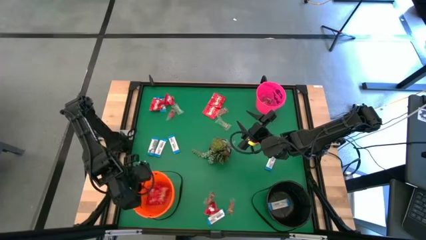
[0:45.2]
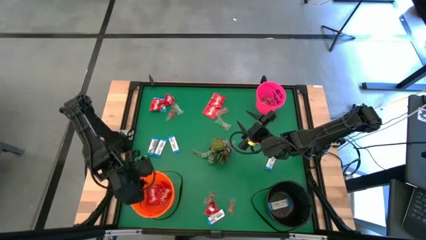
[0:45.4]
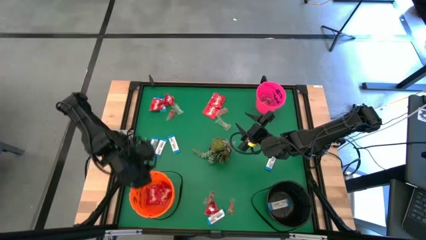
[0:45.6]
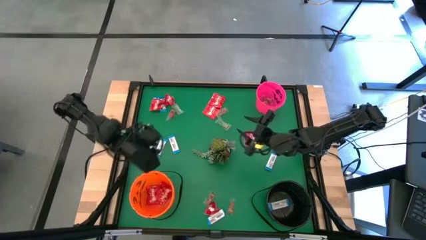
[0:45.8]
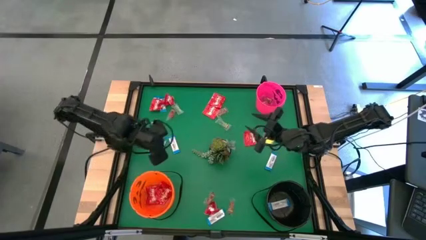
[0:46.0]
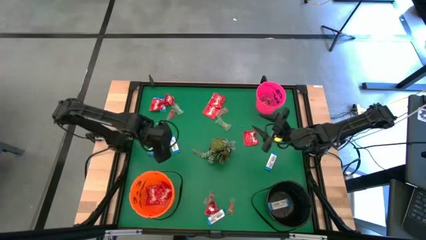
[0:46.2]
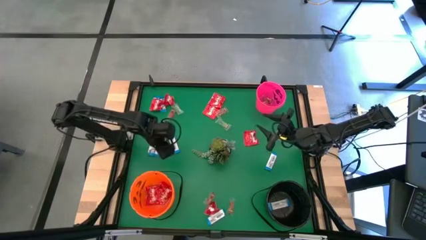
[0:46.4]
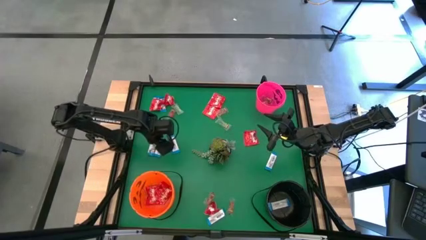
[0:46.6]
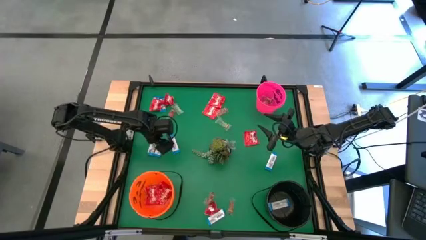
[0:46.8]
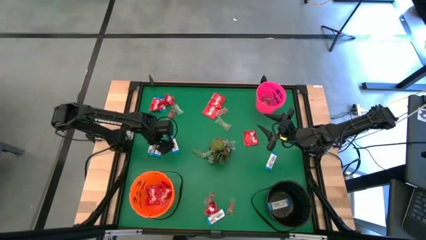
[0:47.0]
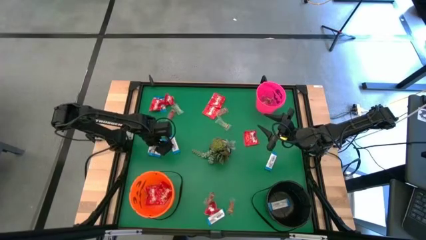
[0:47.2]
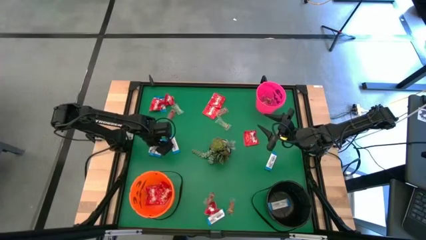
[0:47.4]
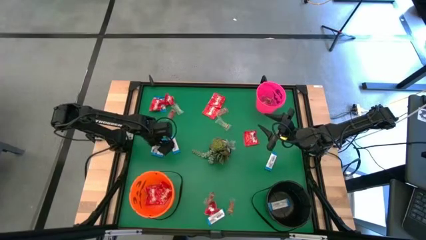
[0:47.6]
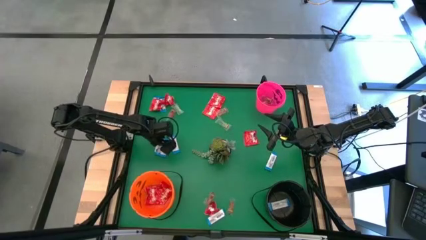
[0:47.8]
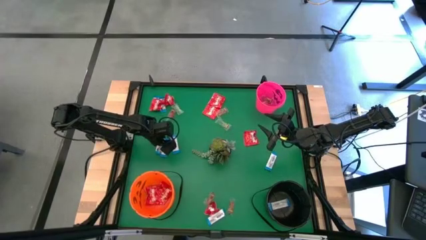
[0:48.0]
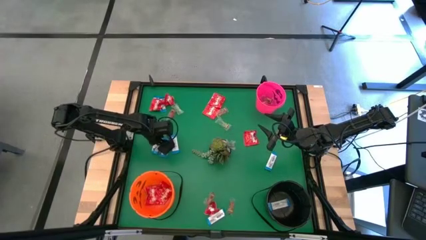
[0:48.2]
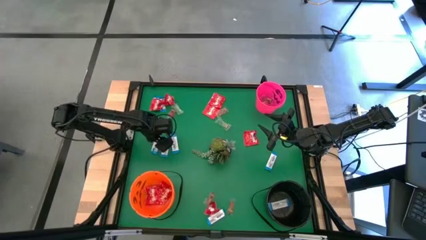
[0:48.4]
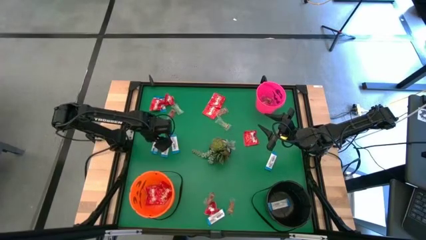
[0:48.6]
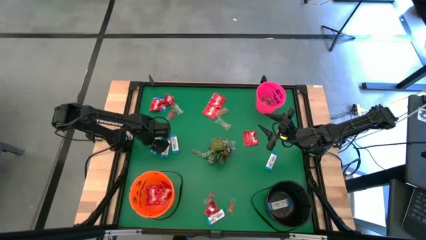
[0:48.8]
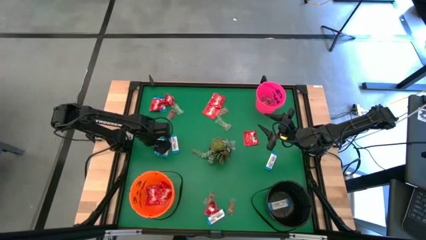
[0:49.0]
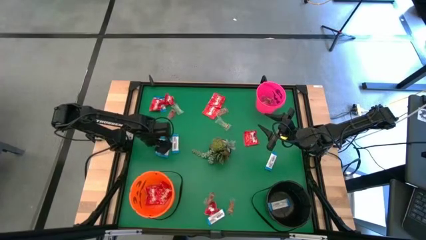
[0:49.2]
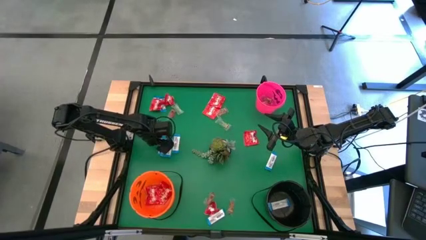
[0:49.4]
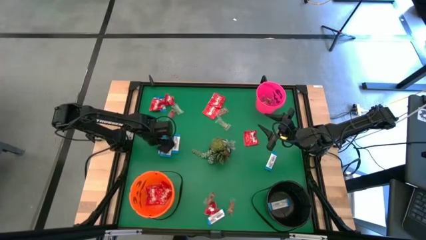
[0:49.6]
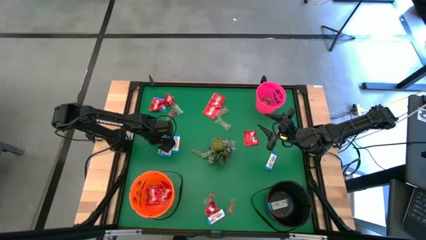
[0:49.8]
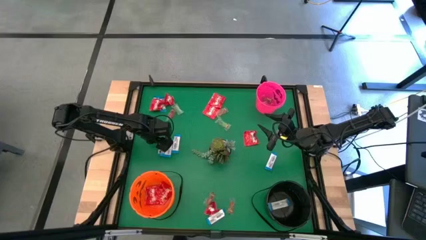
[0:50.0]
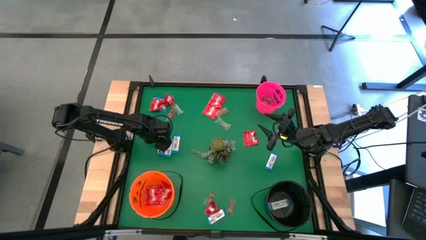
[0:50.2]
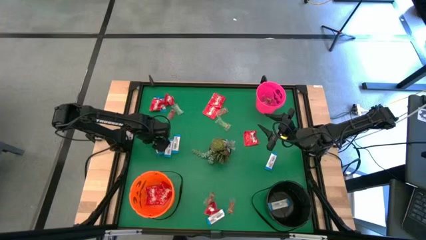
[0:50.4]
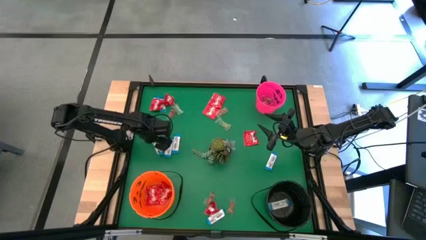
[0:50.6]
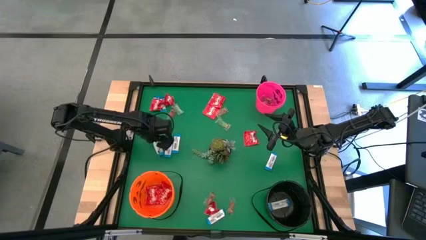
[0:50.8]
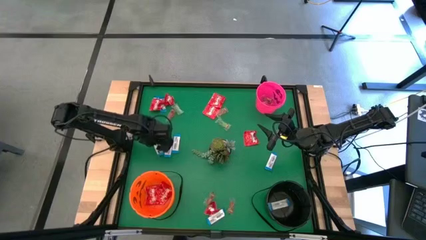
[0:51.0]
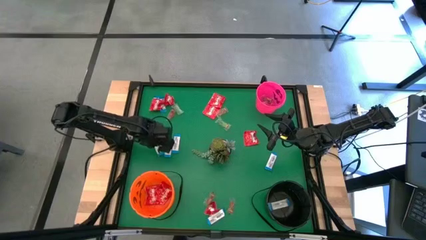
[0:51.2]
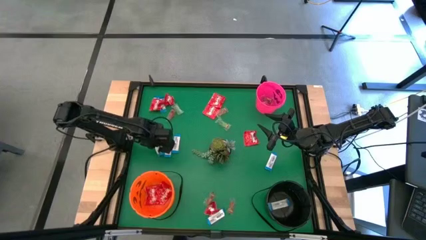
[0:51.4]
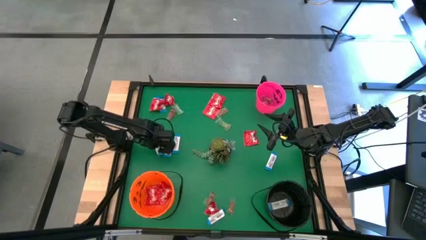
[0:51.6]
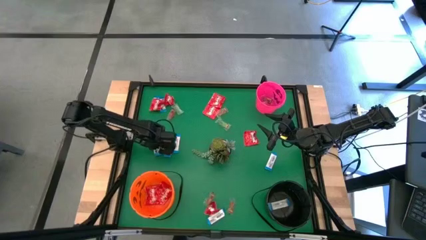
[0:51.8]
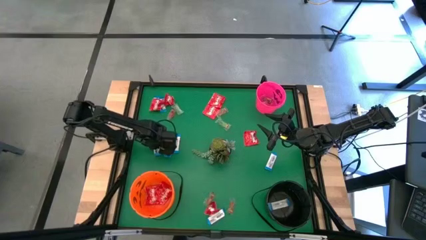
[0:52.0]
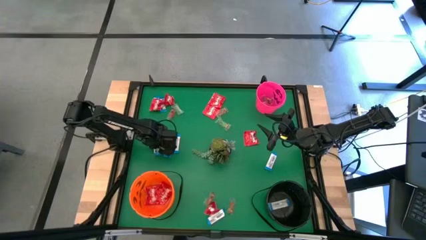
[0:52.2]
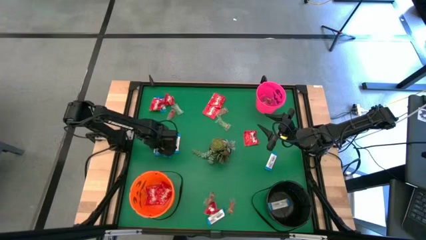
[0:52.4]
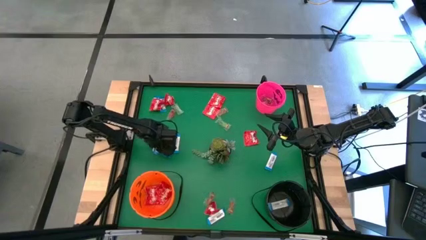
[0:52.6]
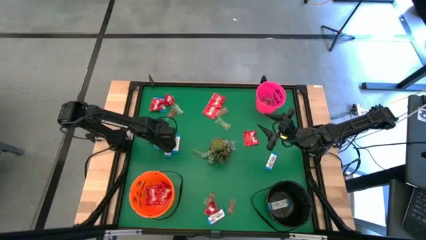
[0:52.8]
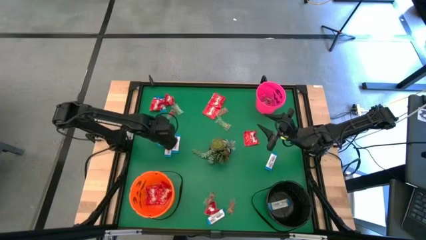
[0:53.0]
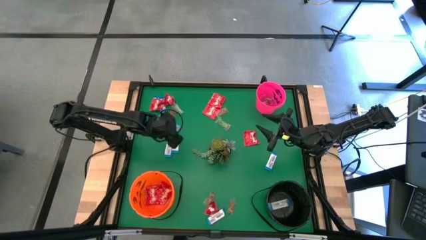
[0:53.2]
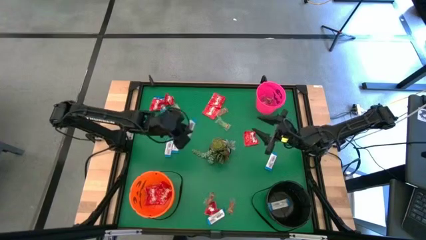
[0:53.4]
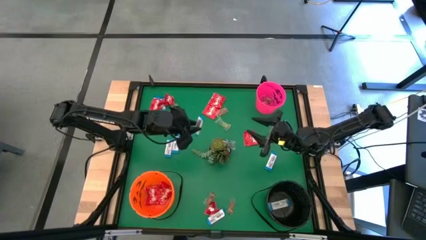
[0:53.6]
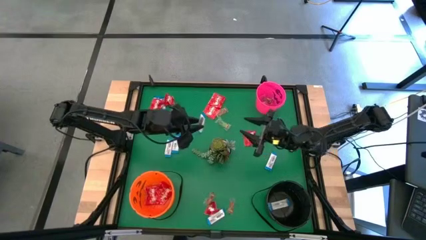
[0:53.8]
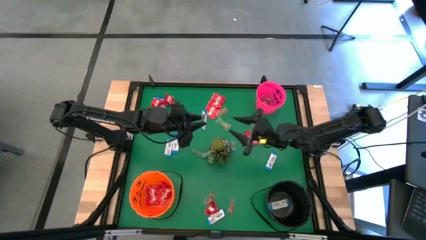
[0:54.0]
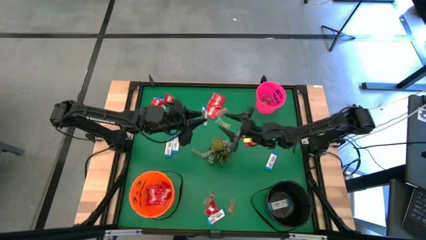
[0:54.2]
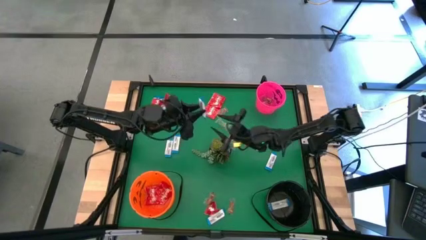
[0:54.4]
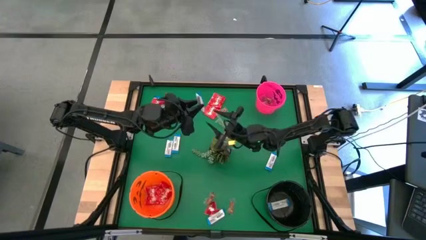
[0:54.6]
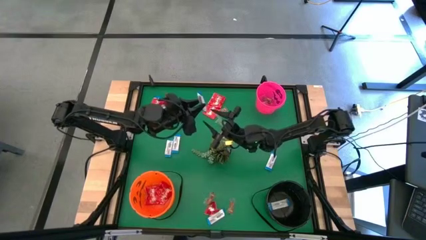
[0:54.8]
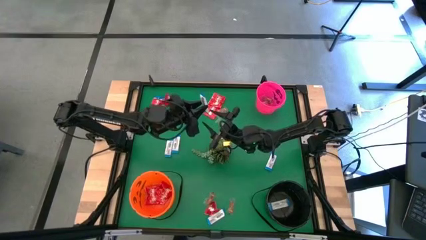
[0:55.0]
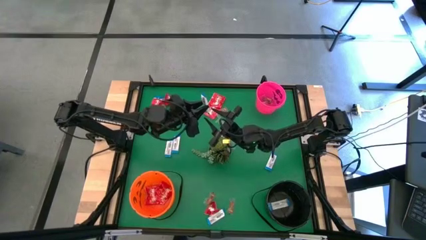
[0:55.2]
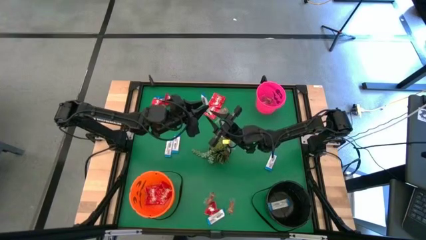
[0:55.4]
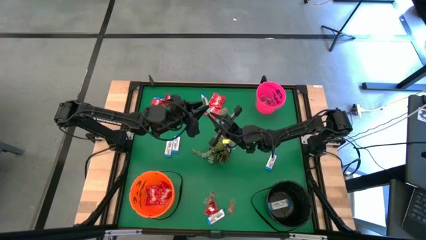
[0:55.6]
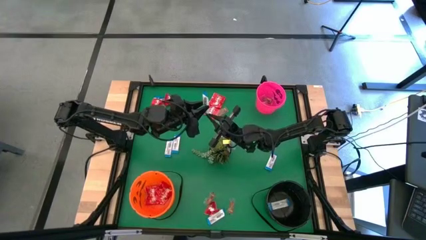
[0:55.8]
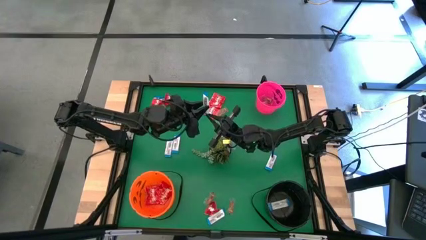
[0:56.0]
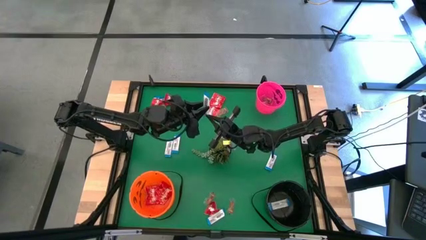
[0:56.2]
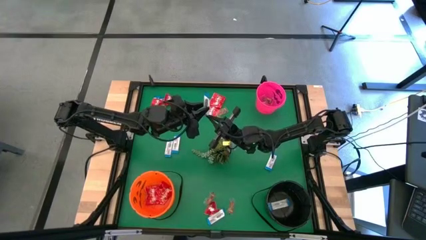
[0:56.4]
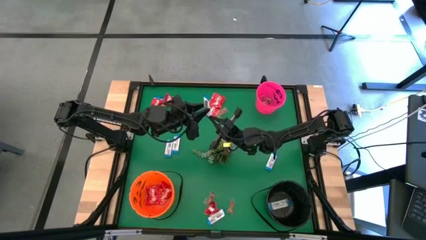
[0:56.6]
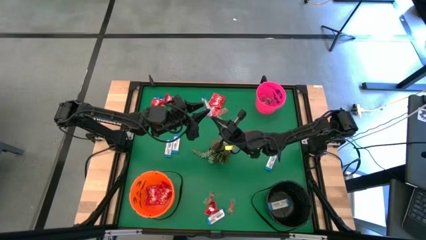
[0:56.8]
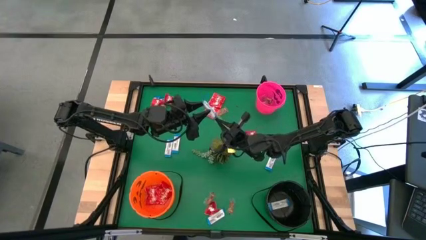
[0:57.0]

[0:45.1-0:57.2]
Task: Sort candy
Put the white chocolate into the black bucket

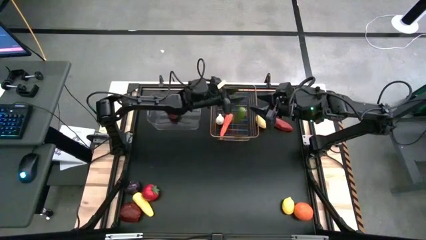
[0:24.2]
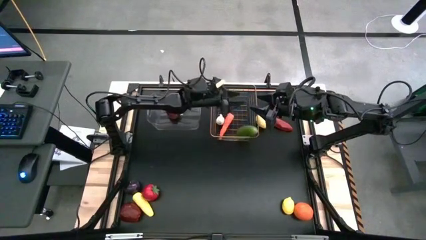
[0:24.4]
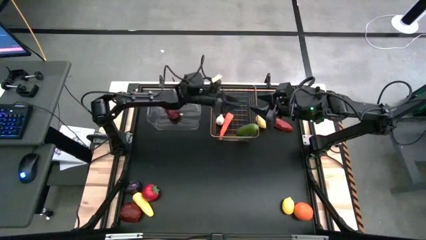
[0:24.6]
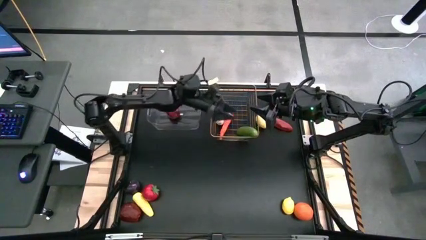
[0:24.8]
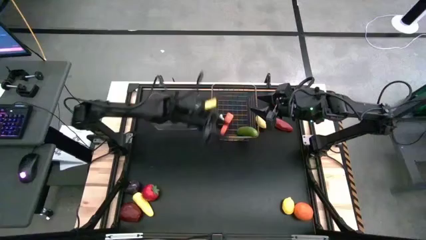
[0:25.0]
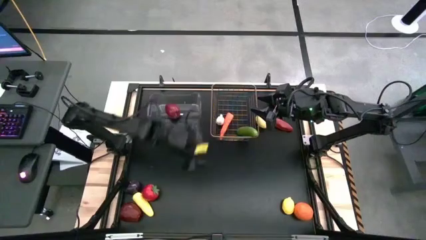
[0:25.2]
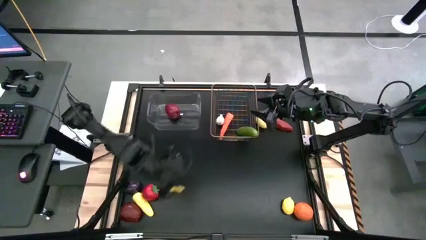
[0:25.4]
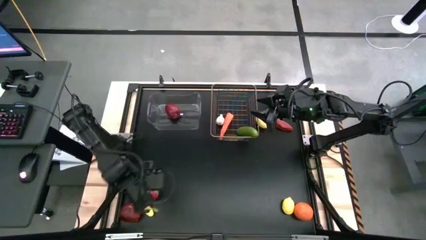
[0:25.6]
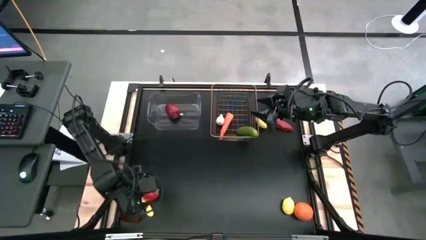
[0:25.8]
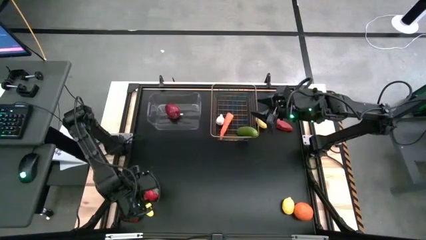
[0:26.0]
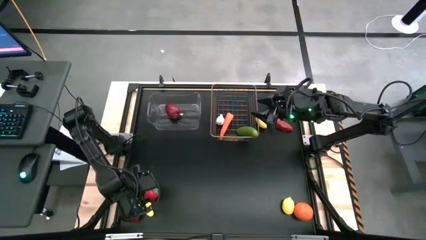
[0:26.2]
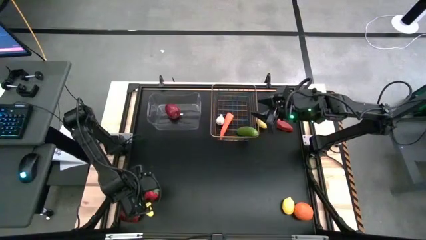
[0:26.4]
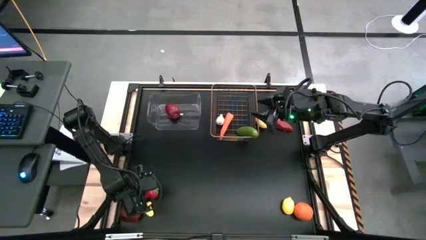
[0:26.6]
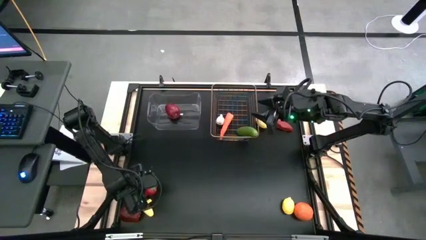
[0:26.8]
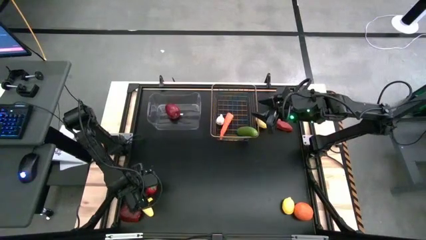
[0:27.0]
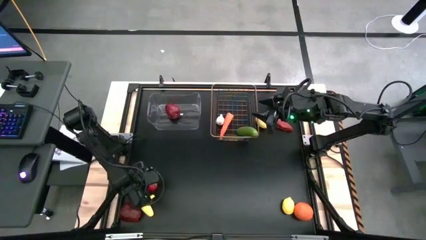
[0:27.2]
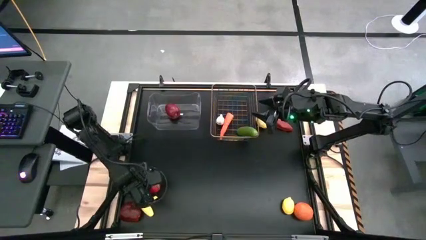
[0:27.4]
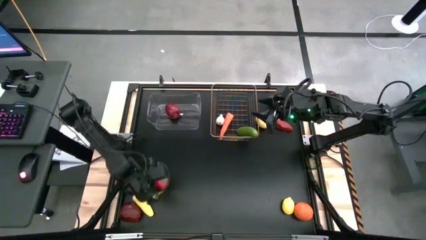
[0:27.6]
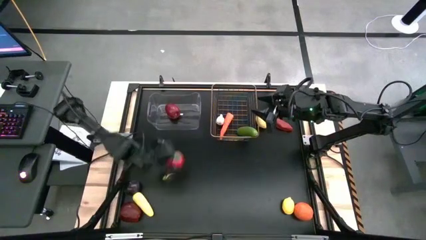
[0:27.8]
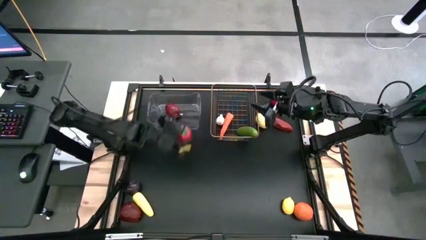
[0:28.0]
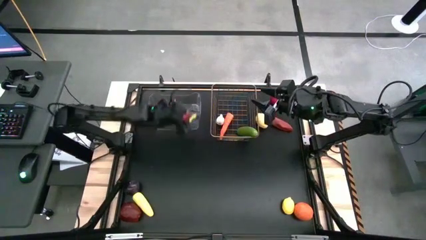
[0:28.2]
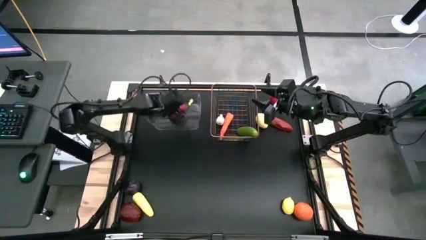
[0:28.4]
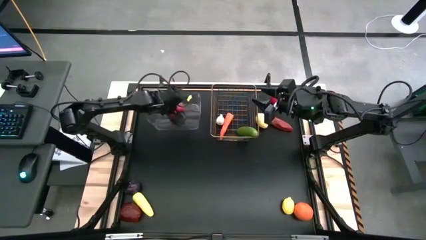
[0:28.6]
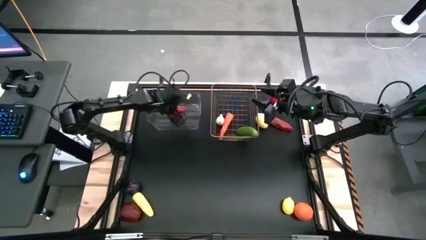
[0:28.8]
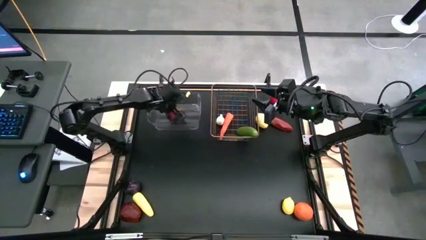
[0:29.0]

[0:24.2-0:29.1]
Task: Sort produce into baskets
Put the bottom tomato into the transparent bin

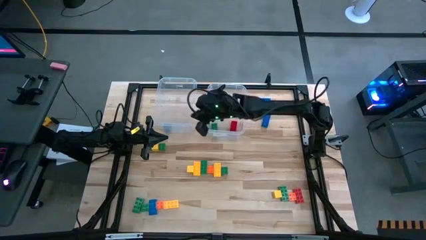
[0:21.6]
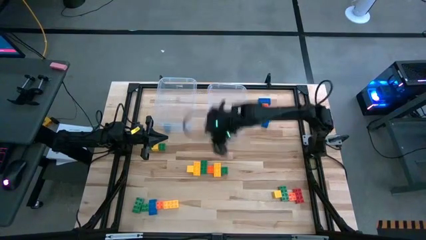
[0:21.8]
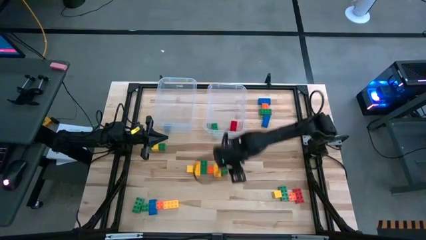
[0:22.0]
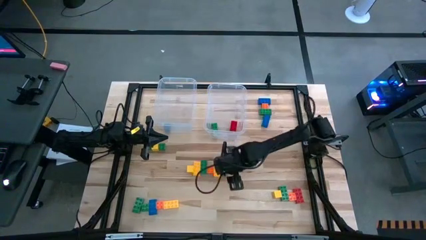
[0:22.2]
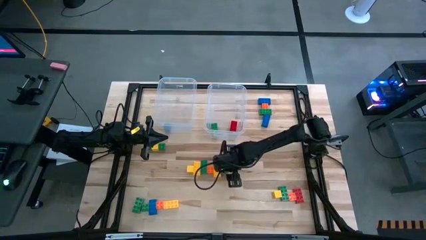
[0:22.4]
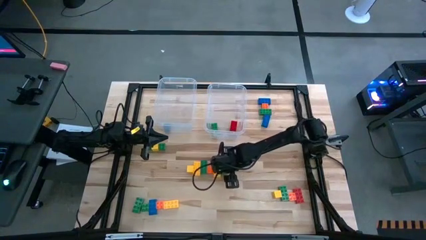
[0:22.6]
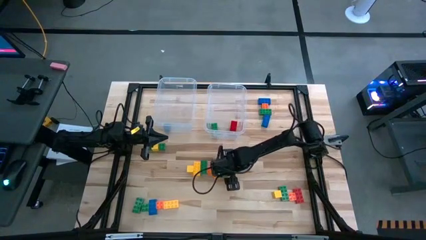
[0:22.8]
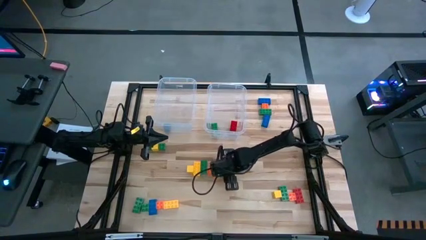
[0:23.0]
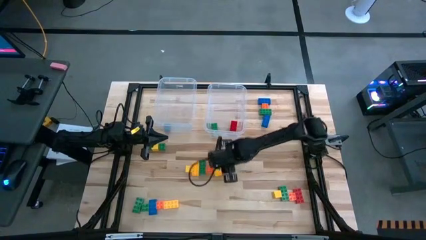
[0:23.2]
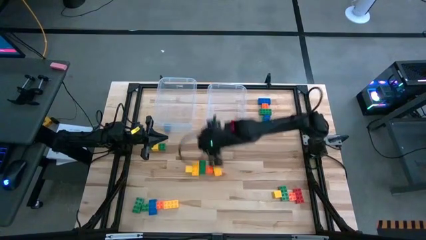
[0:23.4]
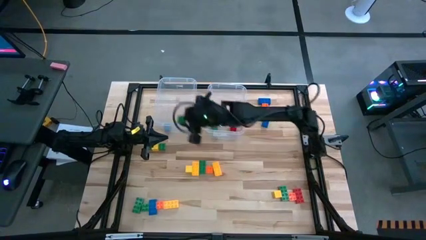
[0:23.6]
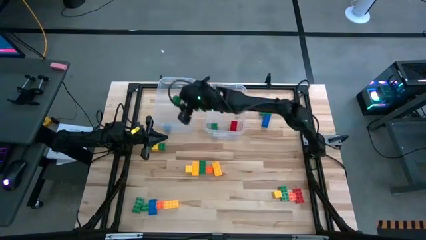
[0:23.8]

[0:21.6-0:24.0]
Task: Sort blocks by size
Put the green small game piece into the left transparent bin
